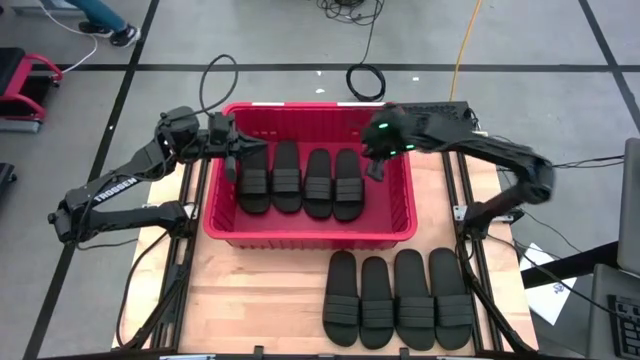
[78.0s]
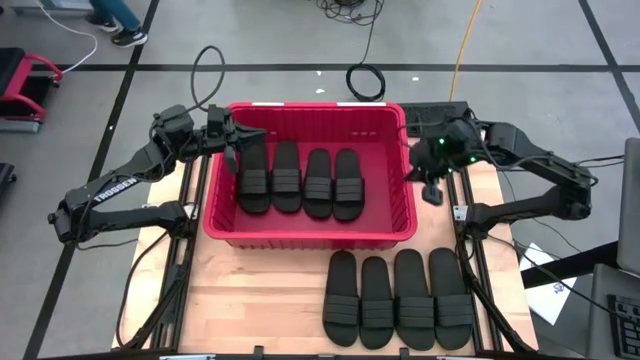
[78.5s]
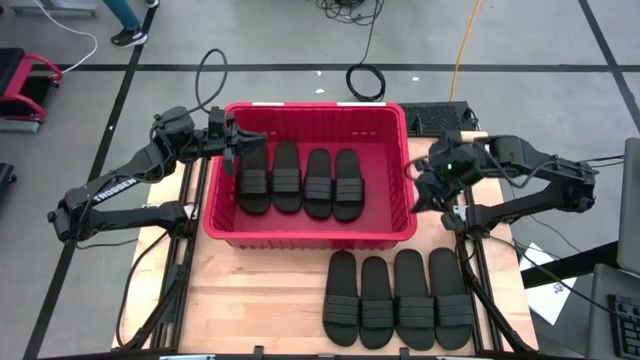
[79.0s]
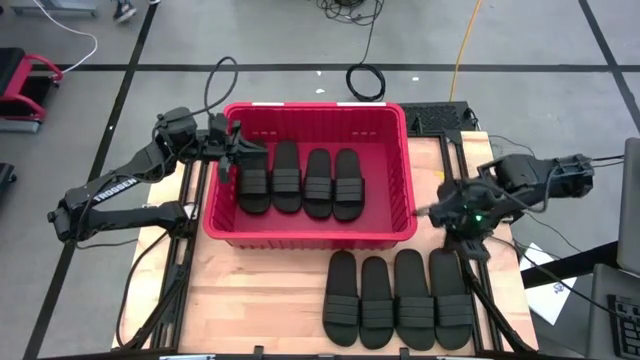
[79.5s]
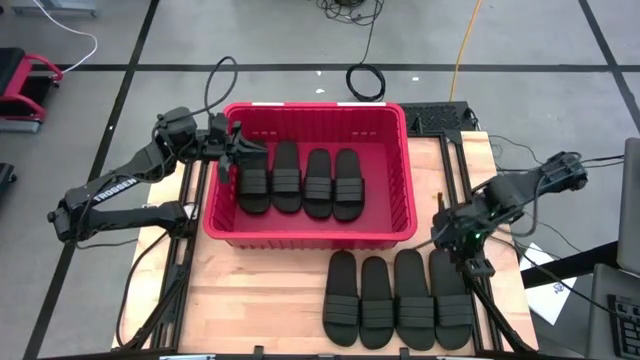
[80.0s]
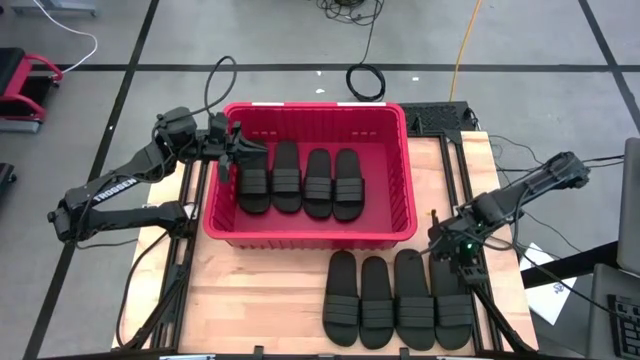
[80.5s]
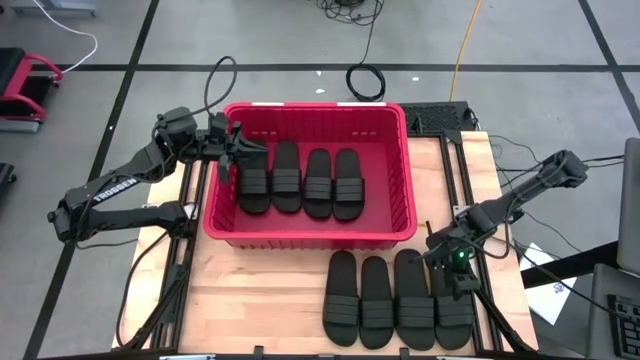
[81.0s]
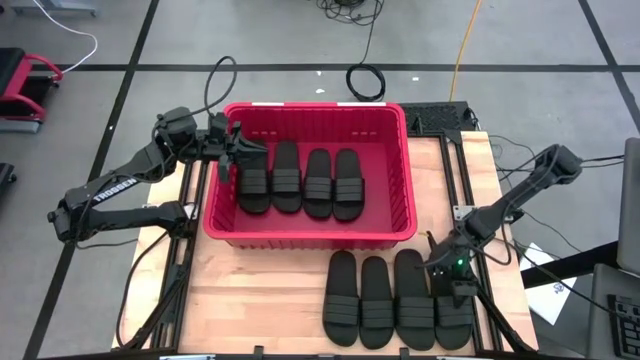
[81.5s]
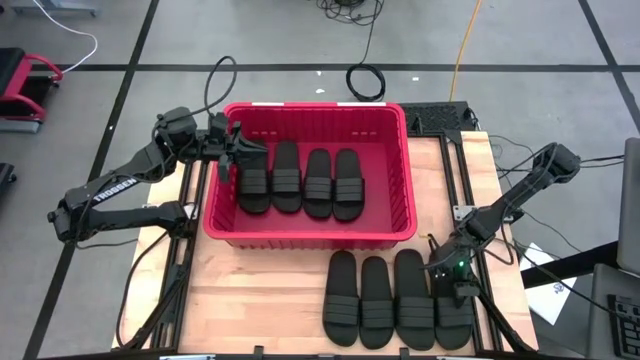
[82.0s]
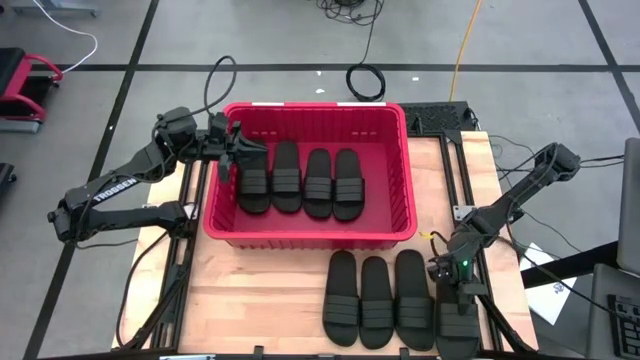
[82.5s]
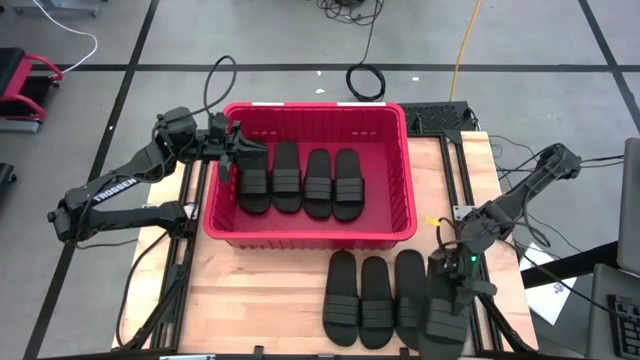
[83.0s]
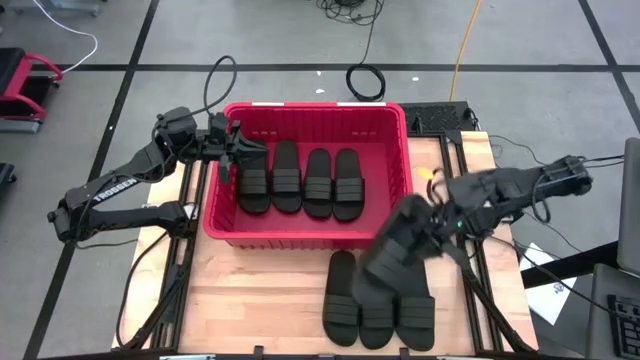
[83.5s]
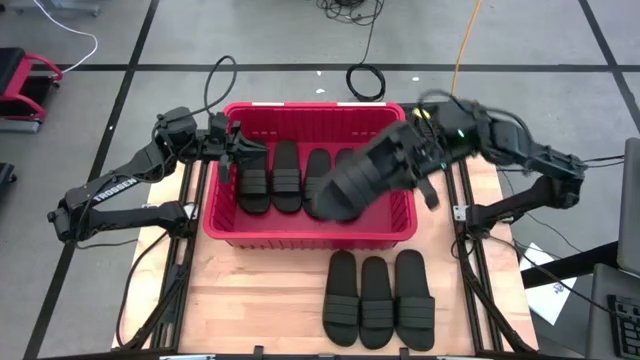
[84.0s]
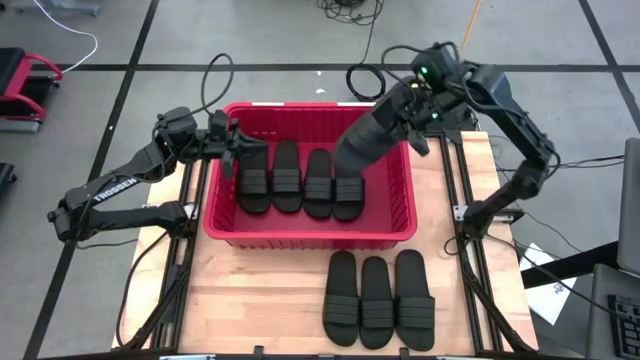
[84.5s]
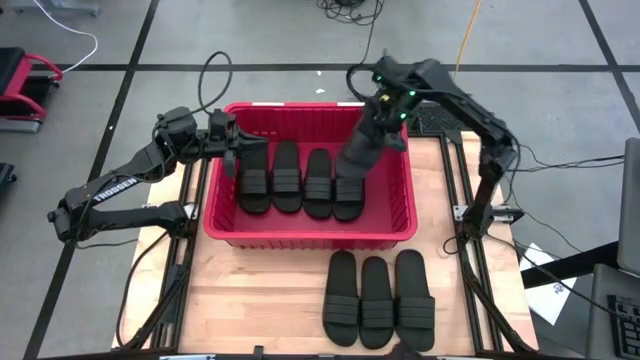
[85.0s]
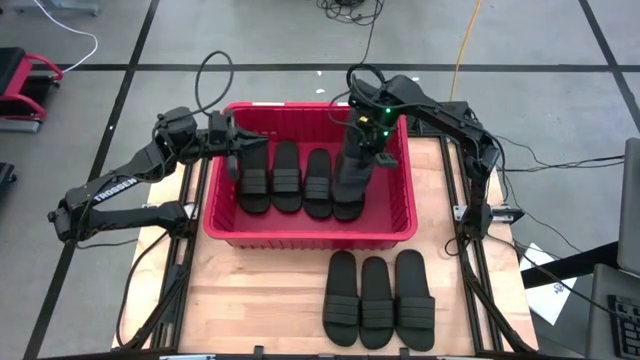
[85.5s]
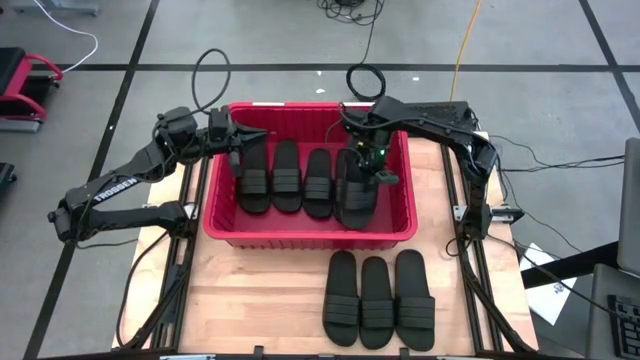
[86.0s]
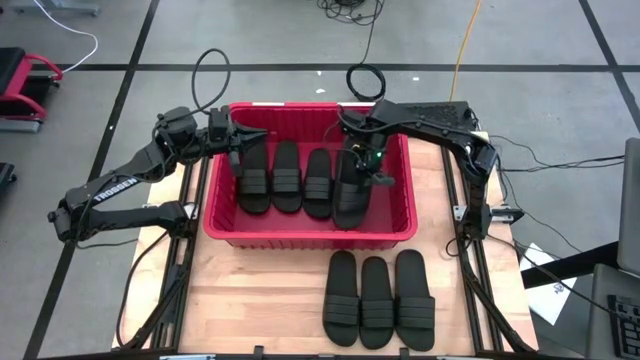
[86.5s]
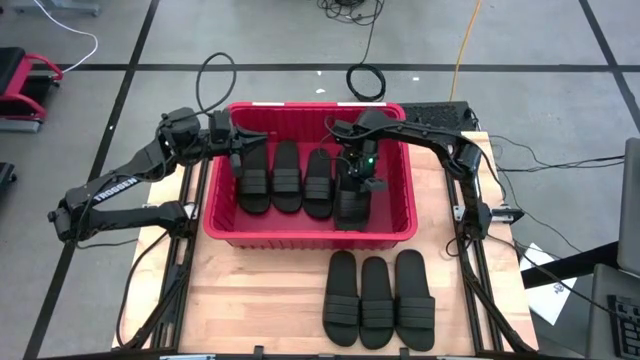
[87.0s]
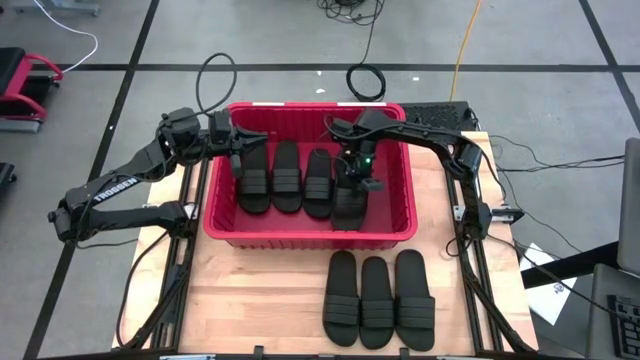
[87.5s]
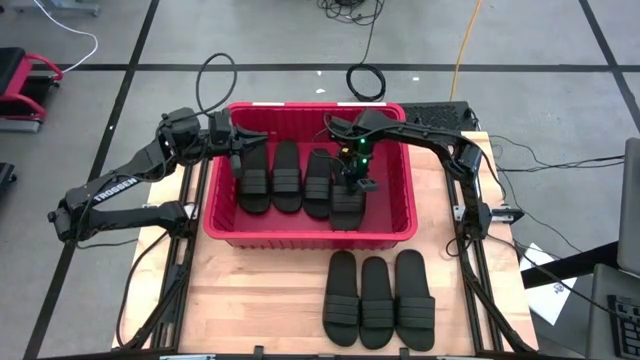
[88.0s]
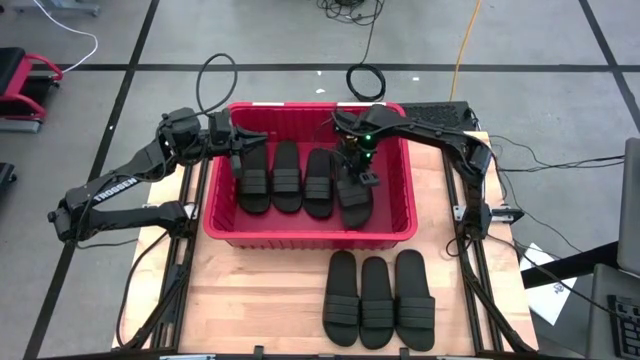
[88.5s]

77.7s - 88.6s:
Task: Pick and place slides into bin
Put the slipper on top of the slipper inside the bin

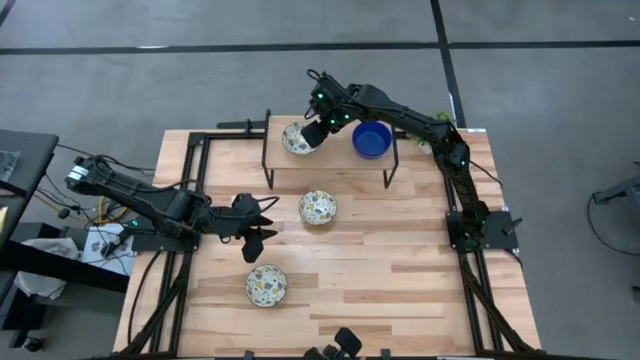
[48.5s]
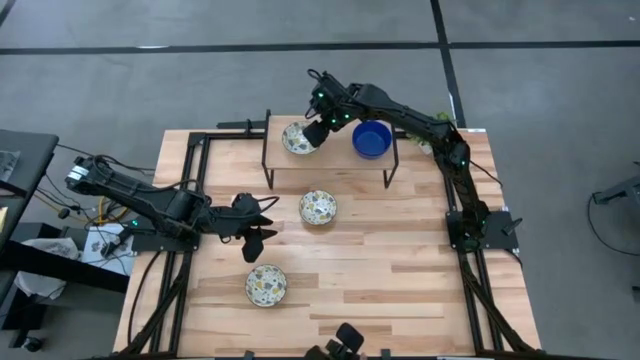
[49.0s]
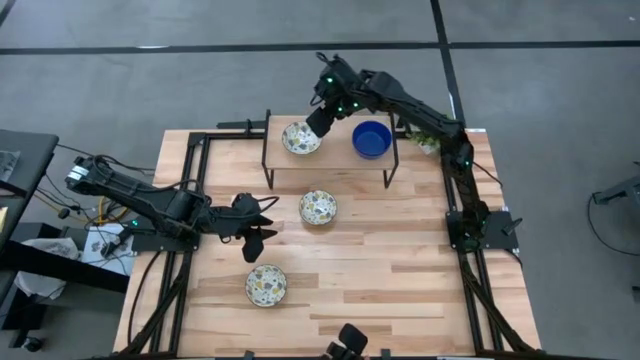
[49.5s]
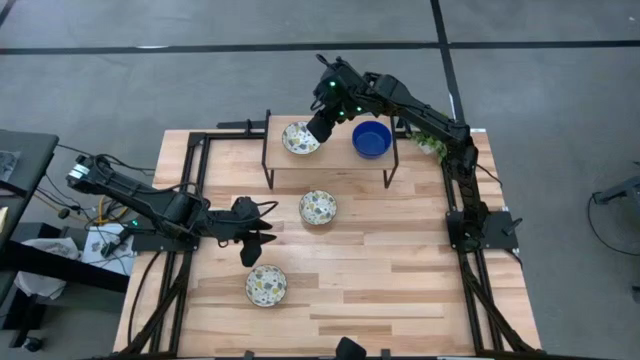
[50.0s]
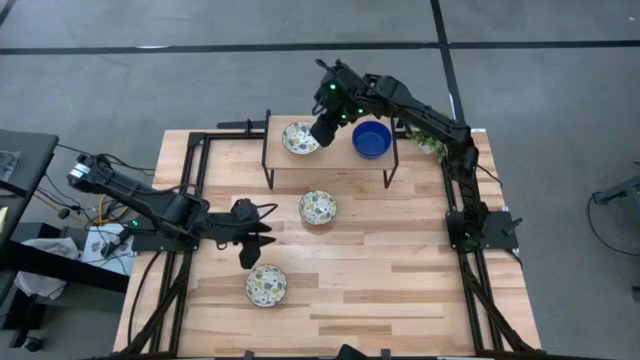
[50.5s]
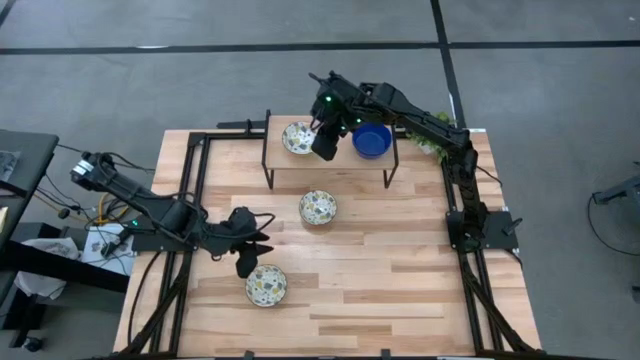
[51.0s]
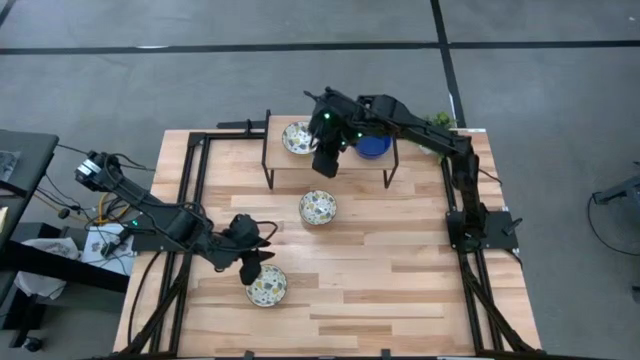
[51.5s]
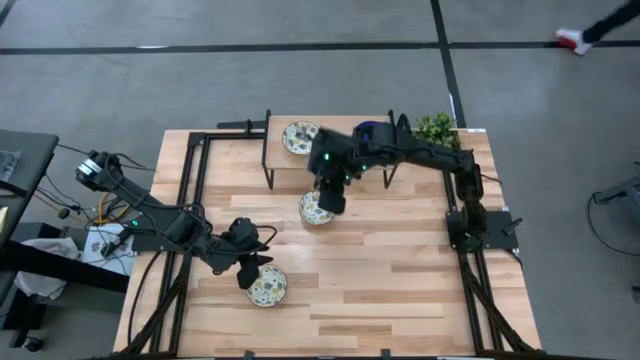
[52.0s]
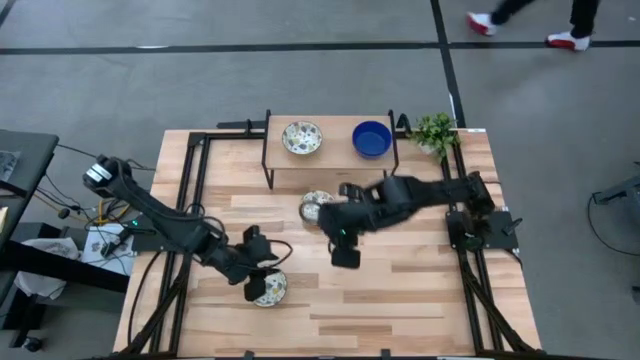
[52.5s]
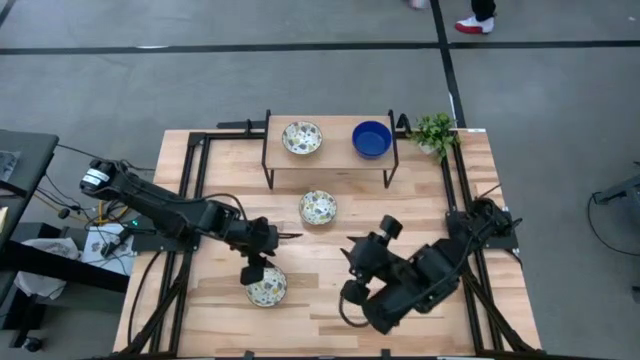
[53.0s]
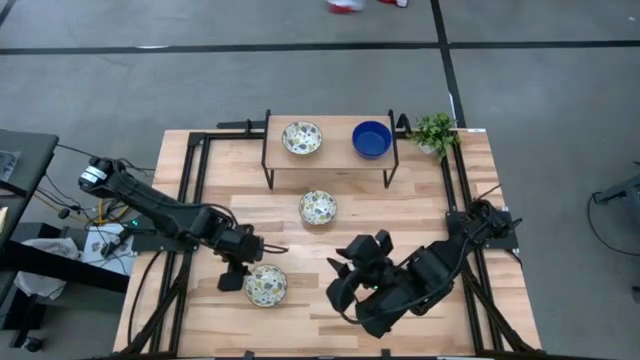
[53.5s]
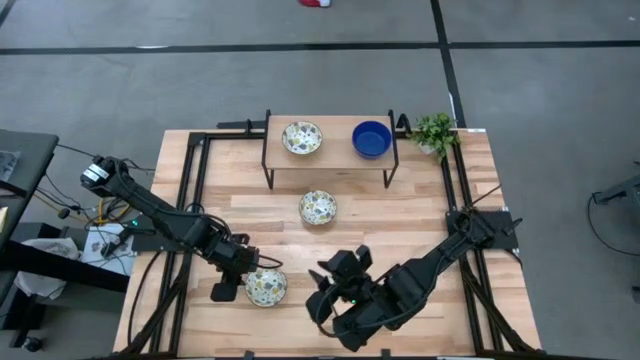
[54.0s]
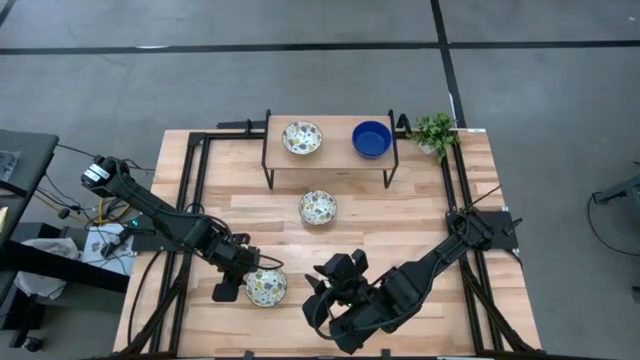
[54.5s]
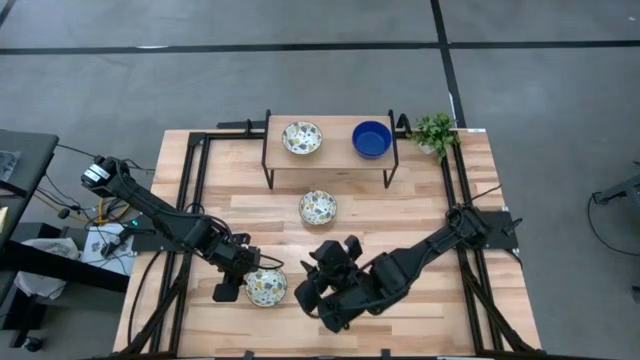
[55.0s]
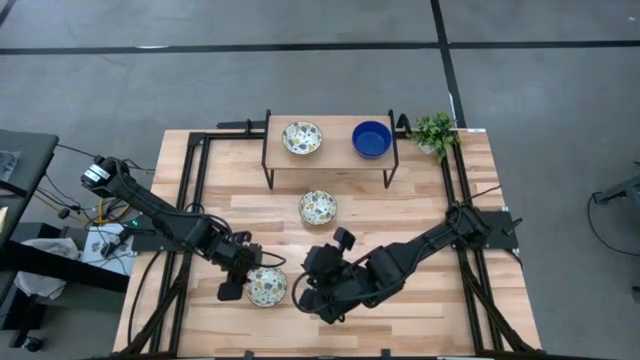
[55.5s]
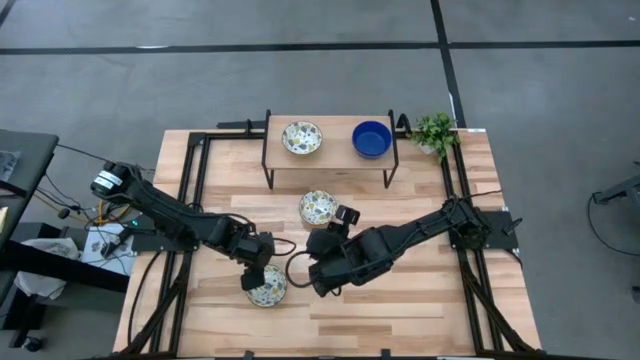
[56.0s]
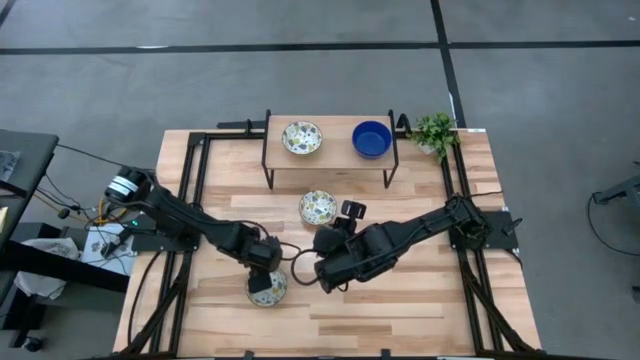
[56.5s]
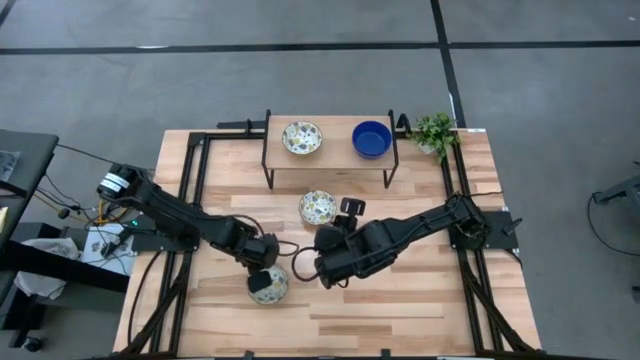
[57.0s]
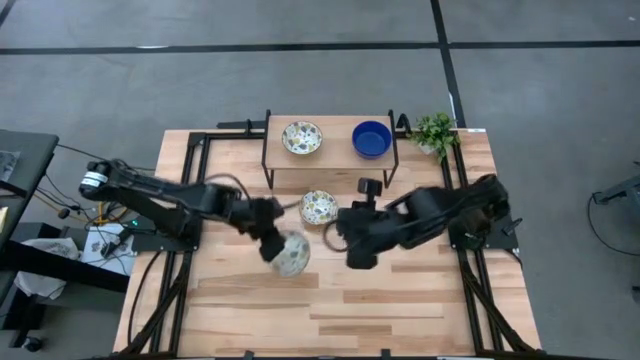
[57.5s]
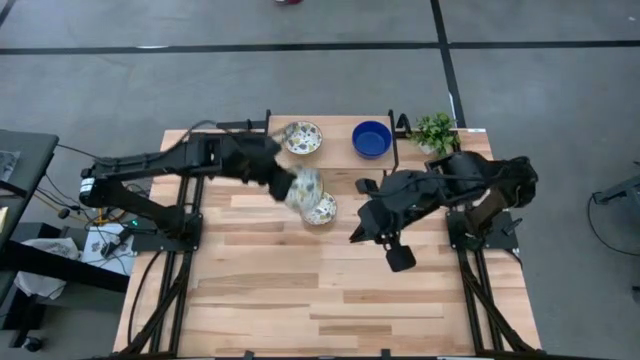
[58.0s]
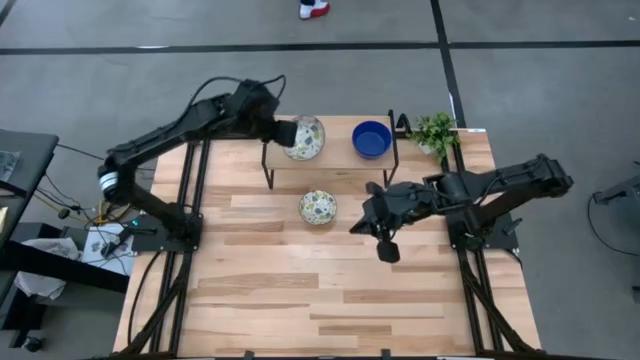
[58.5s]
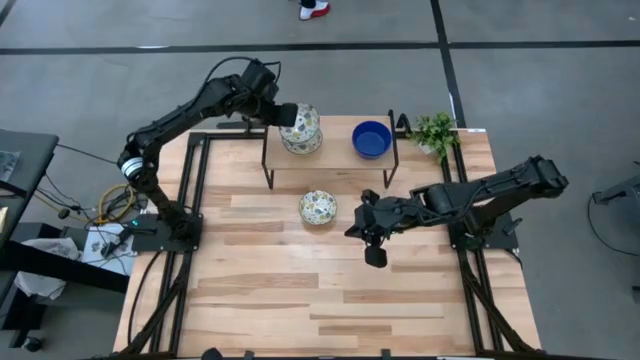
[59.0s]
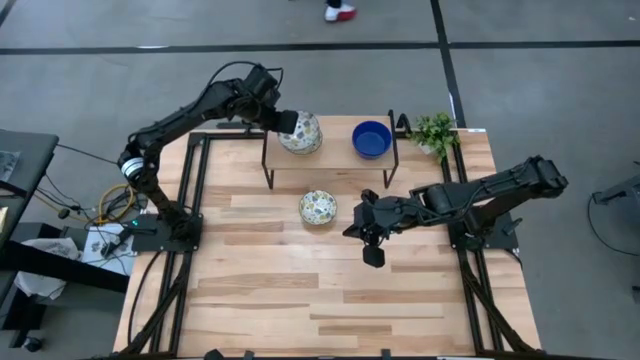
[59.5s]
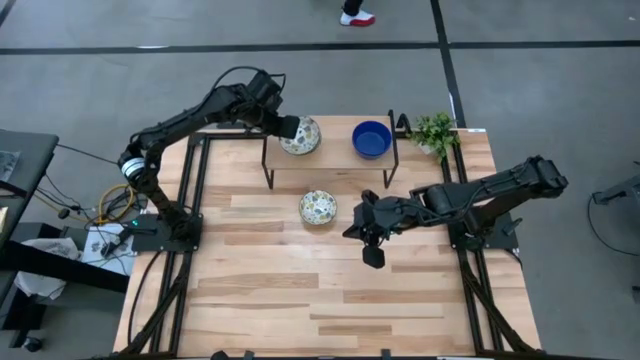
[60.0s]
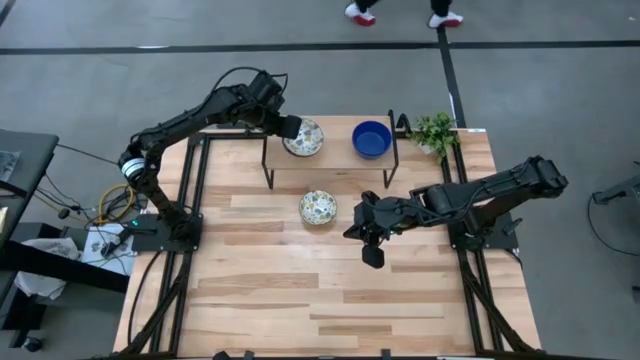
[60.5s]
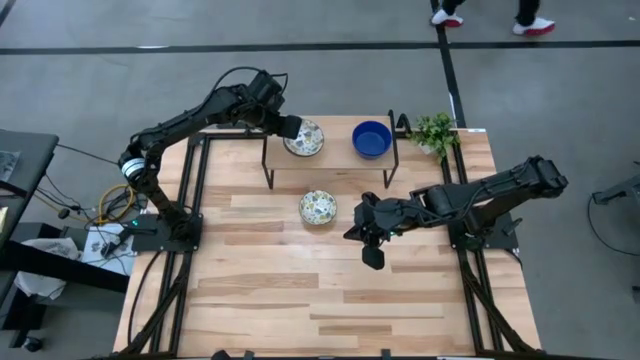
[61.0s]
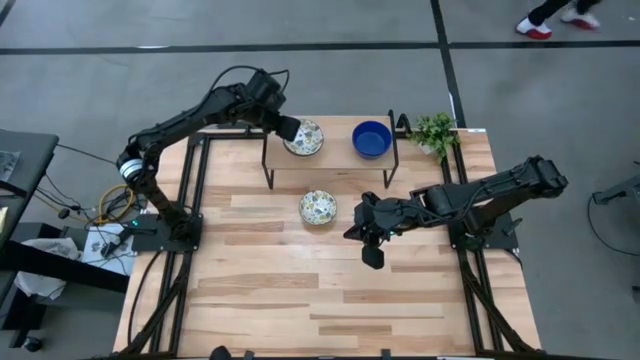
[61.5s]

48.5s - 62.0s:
Task: Pick & Place Mini bowls
Stack the bottom white patterned bowl on the white patterned bowl on the shelf
